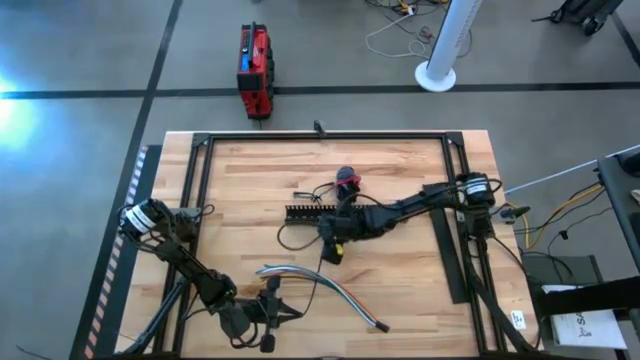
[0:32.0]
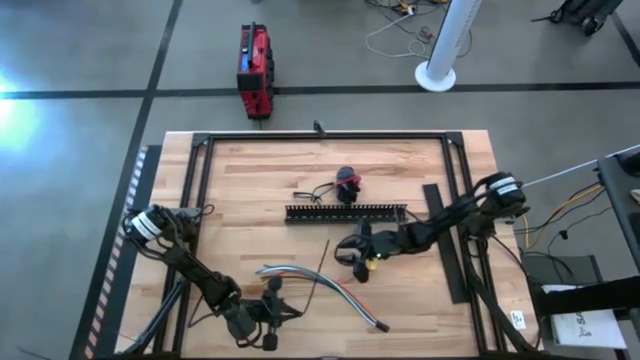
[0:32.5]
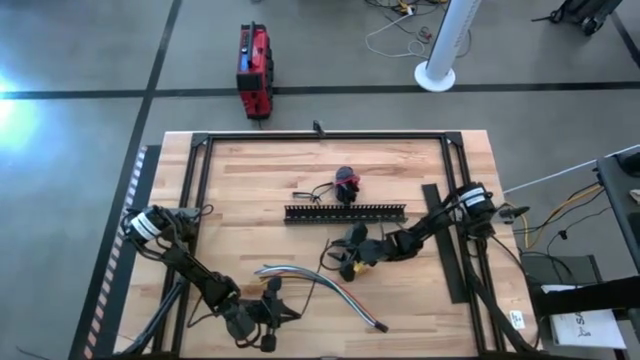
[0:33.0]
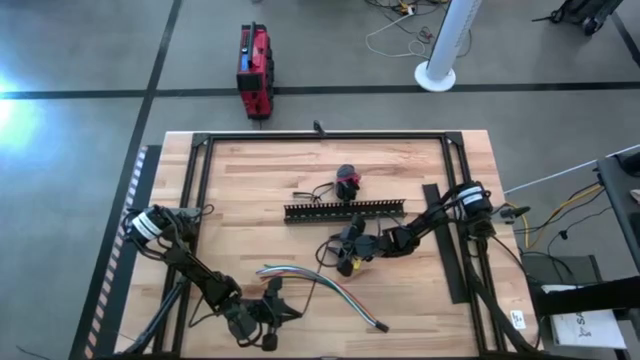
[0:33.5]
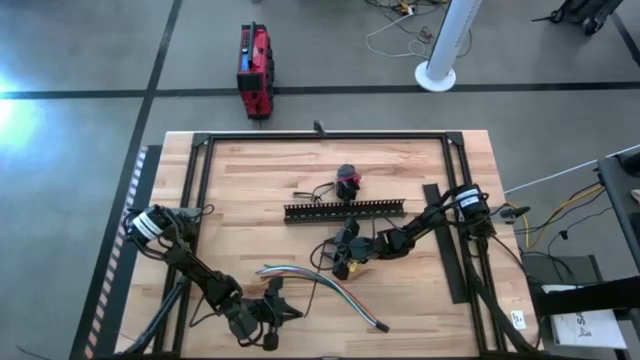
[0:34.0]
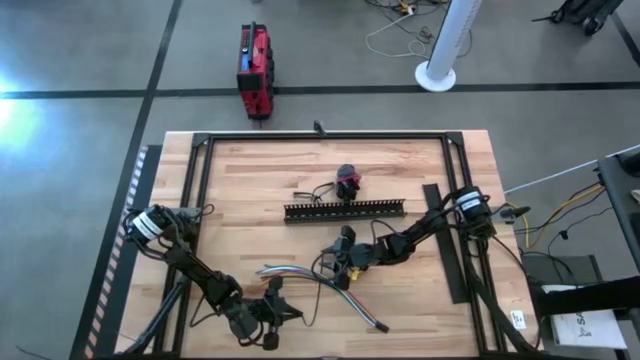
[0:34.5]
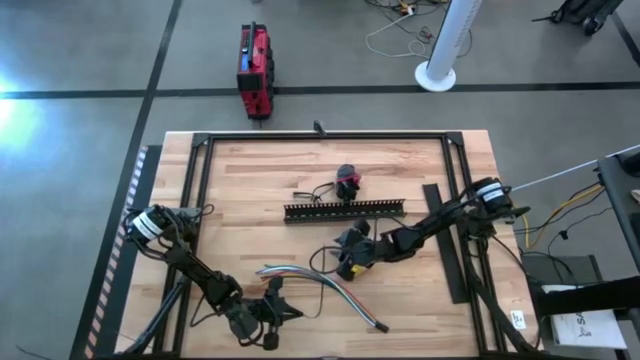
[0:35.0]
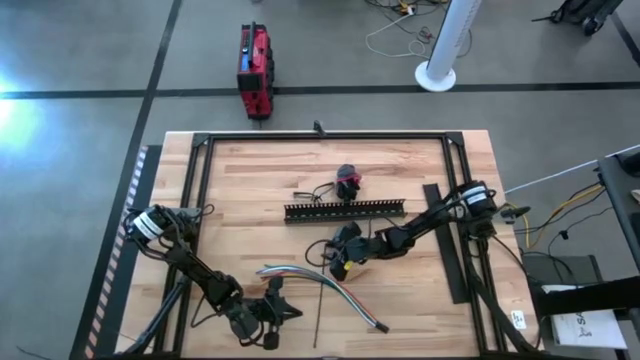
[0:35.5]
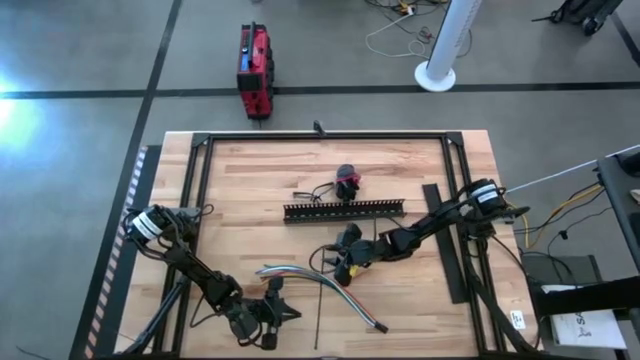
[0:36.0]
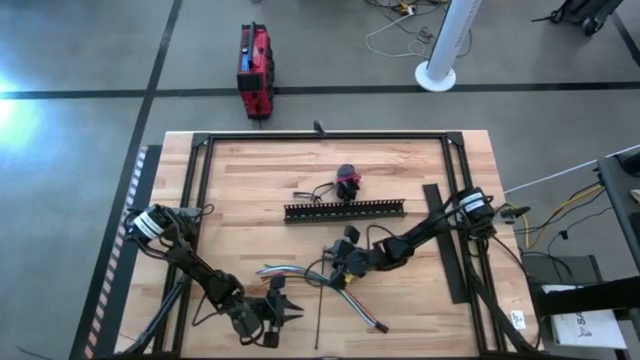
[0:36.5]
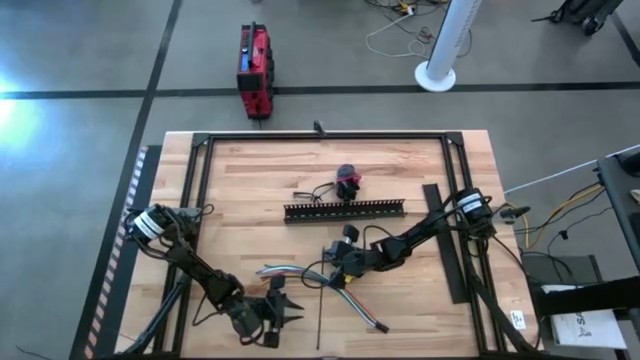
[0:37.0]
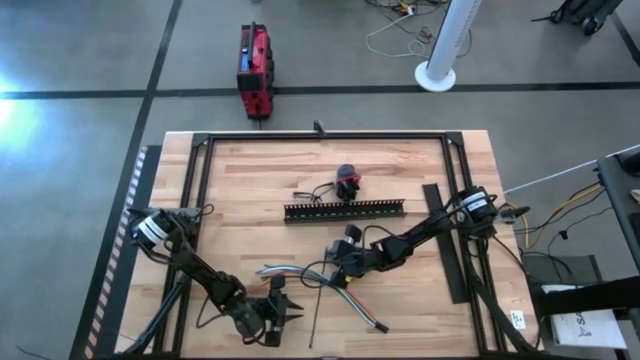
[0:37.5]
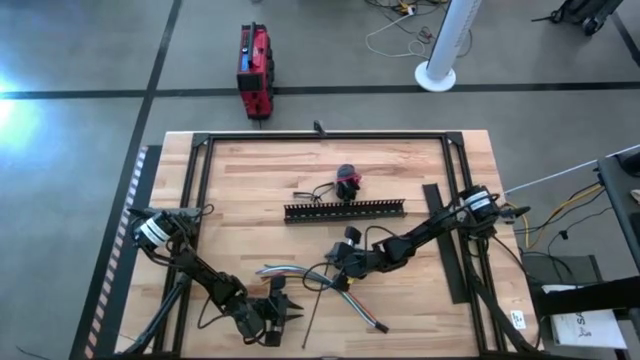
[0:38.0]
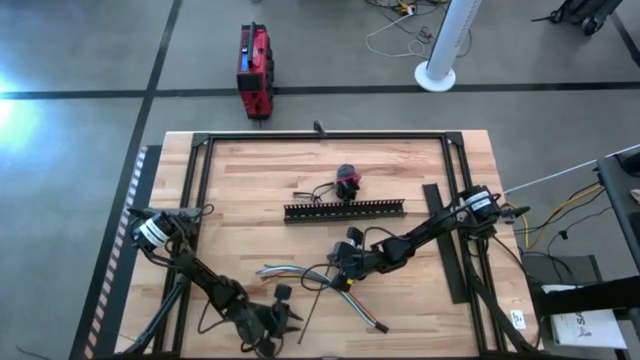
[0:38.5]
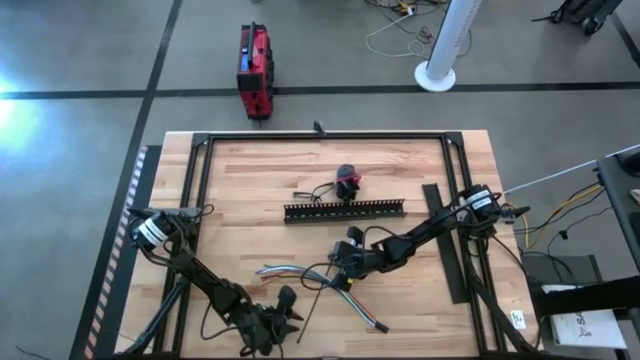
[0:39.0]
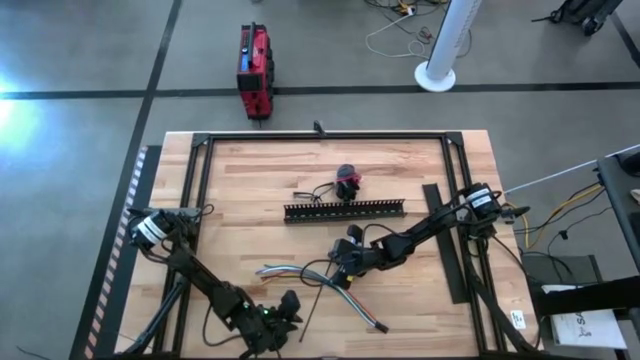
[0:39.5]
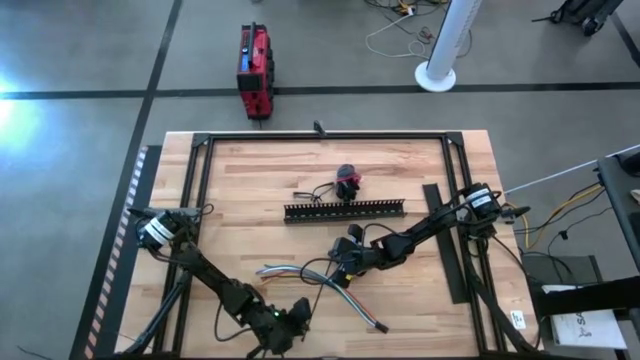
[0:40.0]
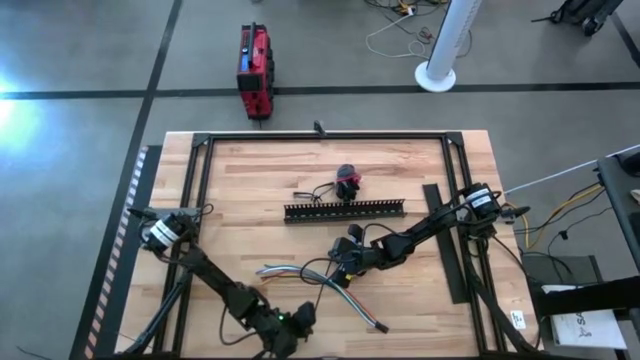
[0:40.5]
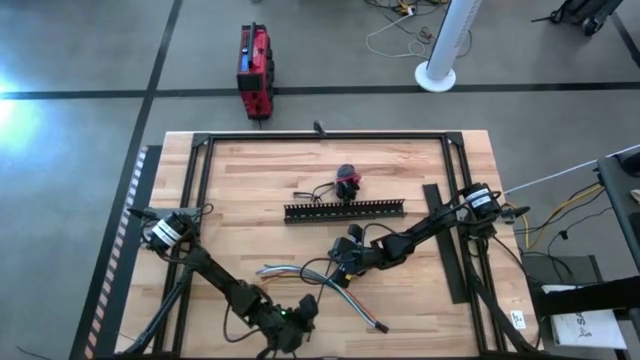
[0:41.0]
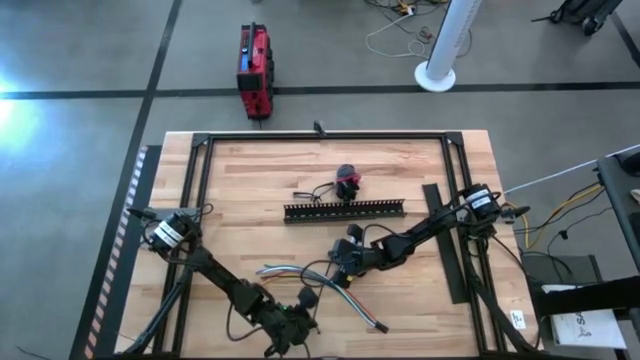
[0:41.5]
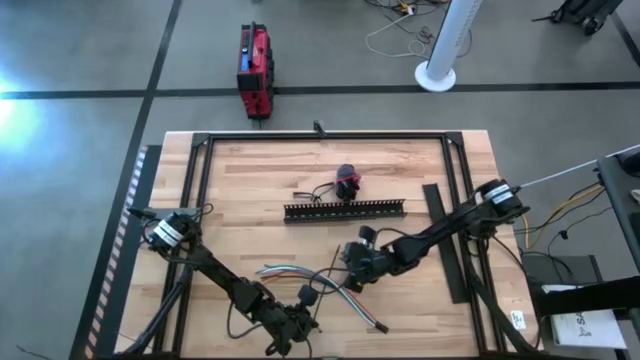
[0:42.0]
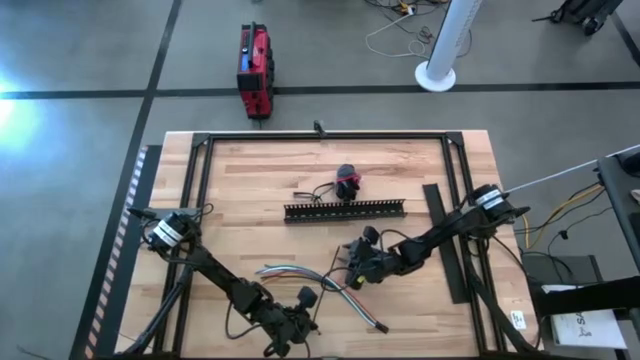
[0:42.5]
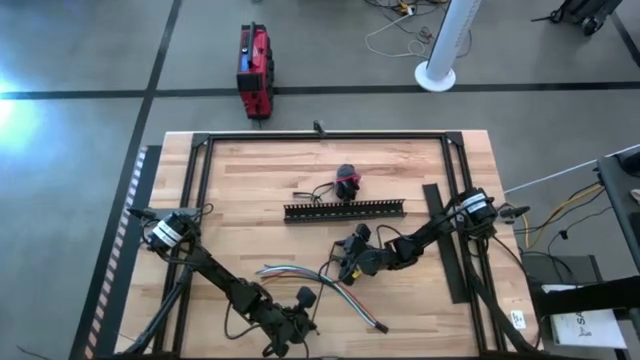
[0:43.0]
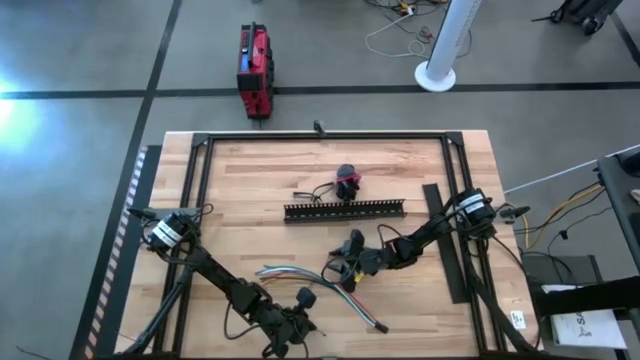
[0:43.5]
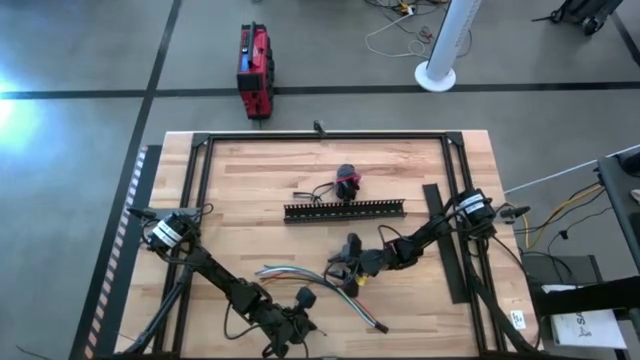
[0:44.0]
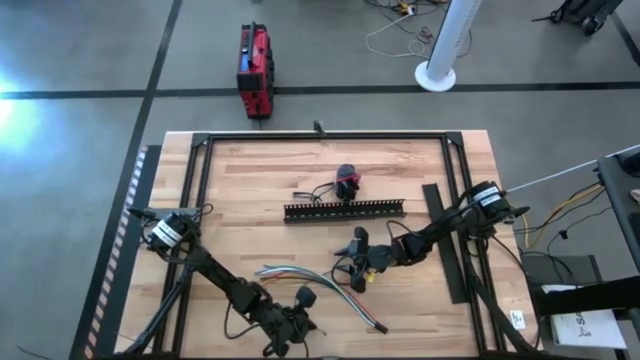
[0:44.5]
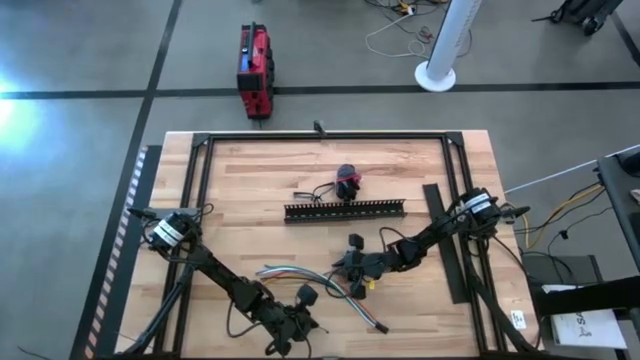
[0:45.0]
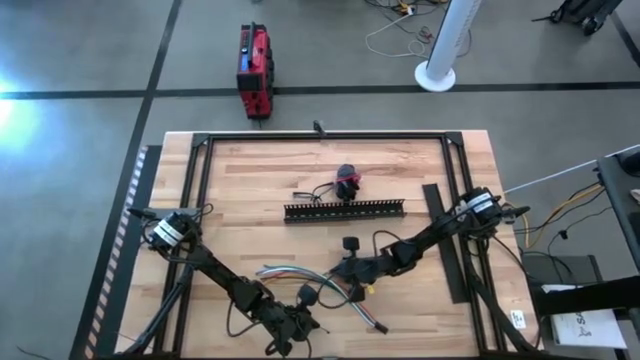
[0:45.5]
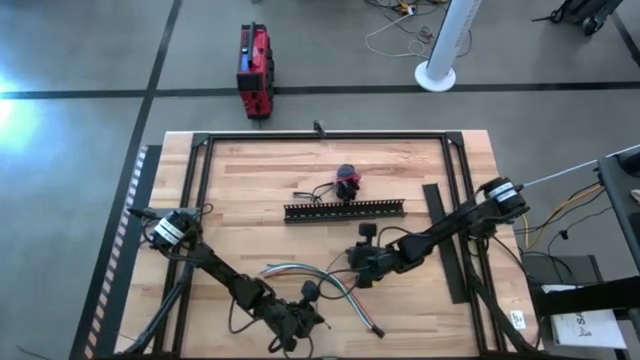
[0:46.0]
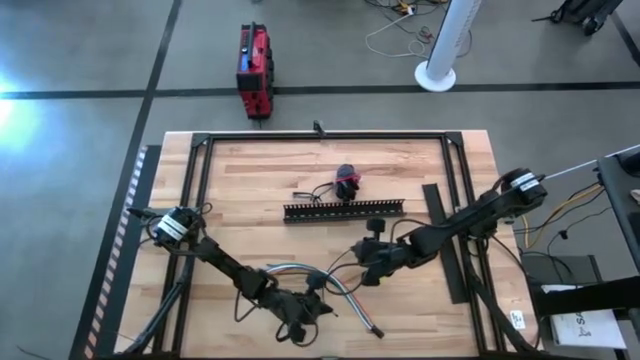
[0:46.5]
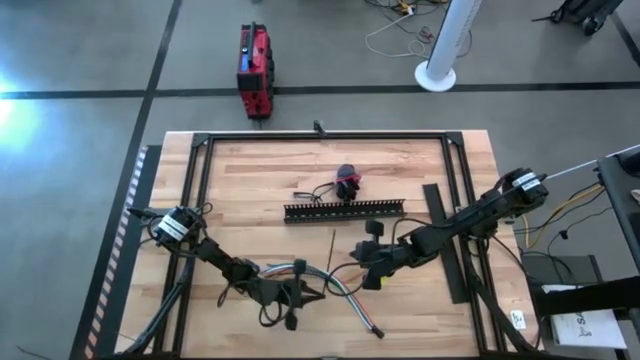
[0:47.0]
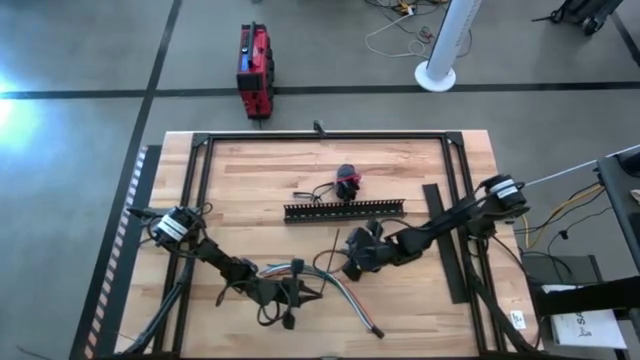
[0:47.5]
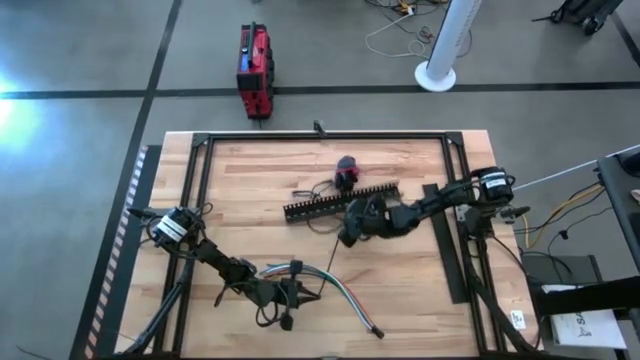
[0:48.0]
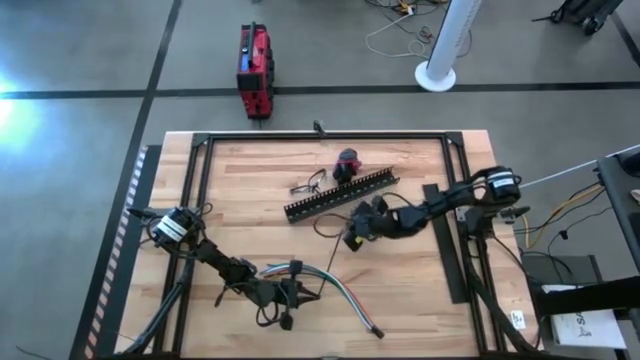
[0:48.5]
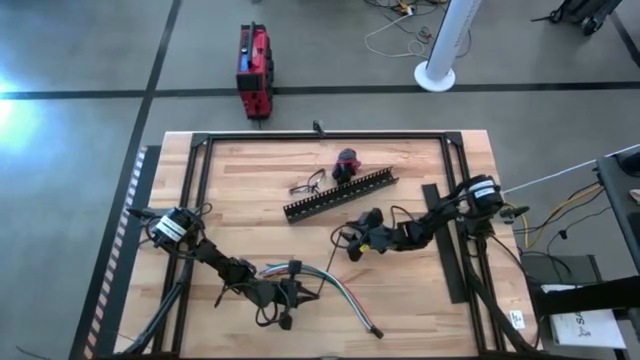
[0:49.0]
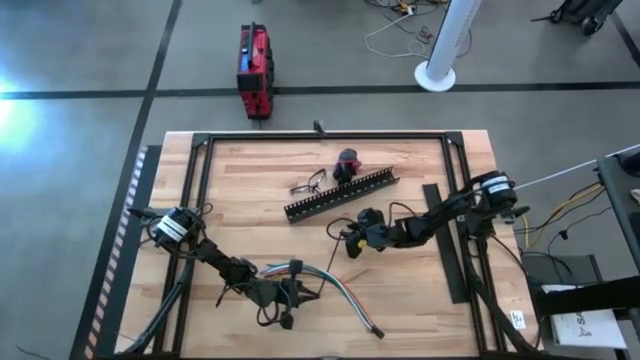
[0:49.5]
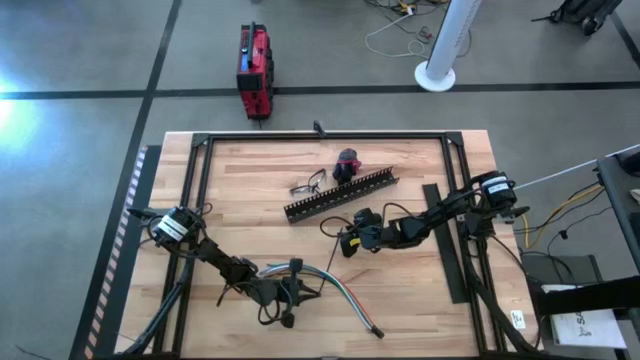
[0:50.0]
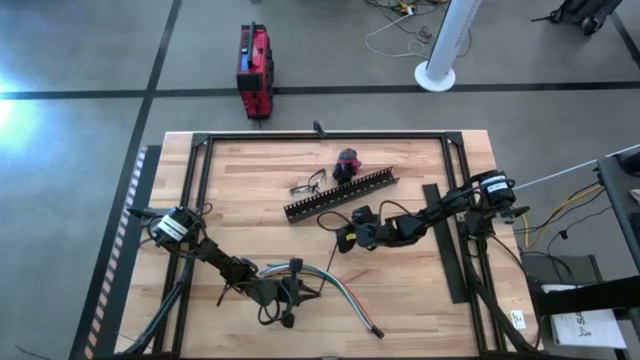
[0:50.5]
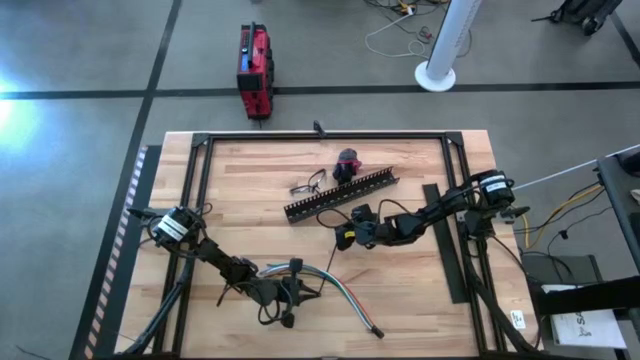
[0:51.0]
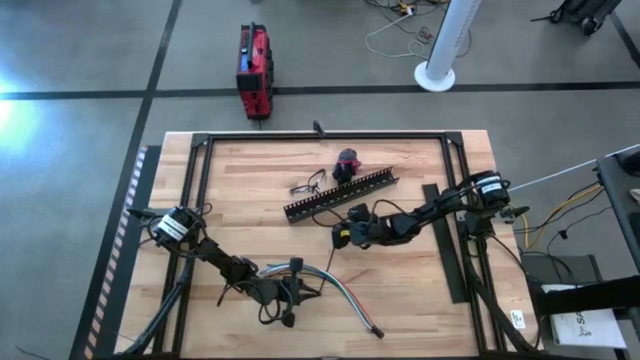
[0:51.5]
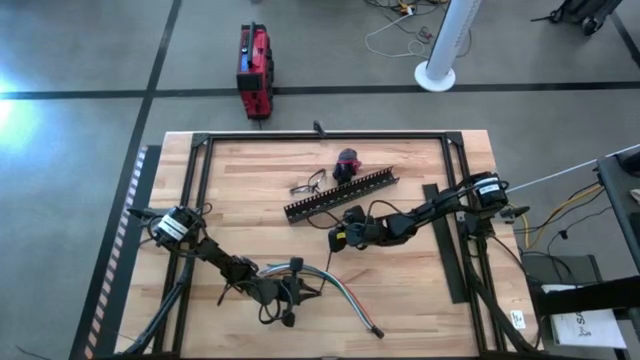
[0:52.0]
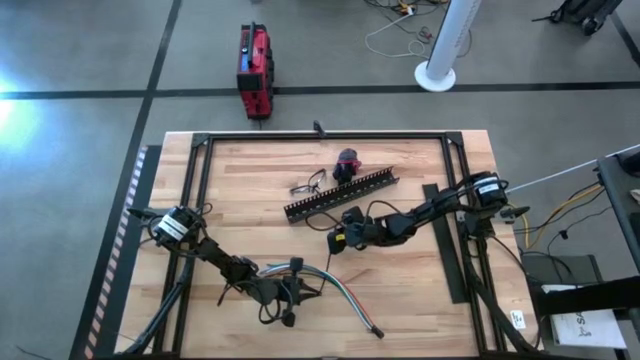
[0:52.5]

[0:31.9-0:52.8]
Task: Ziptie cables
Wrap the cable wires with black zip tie
